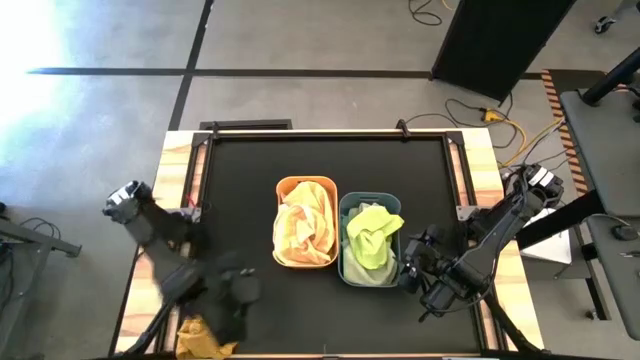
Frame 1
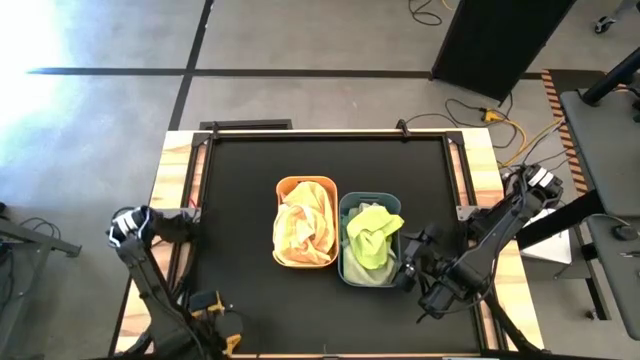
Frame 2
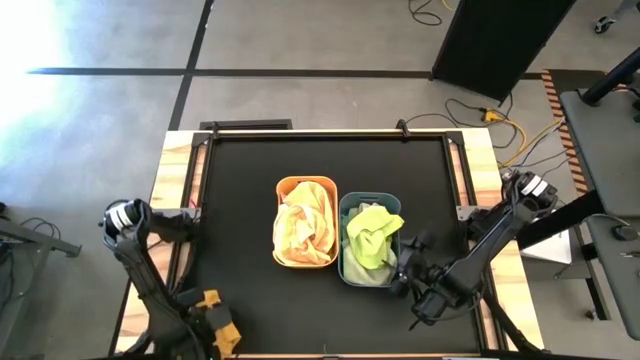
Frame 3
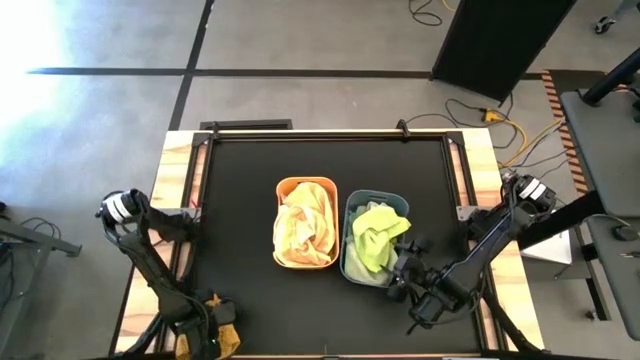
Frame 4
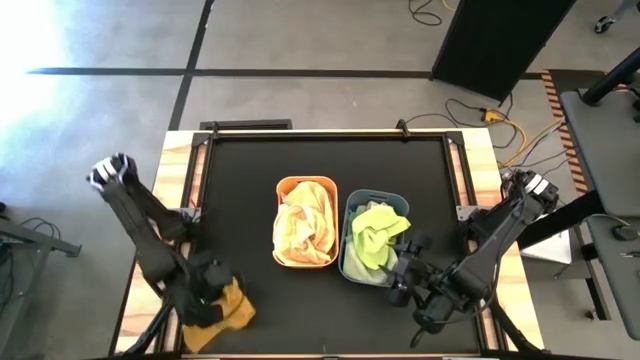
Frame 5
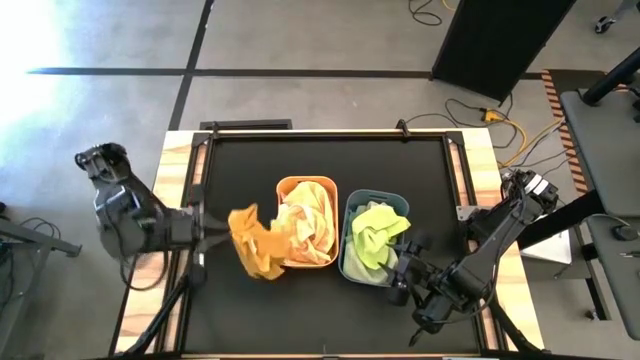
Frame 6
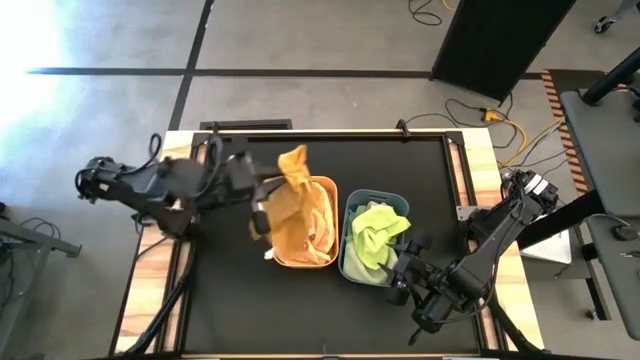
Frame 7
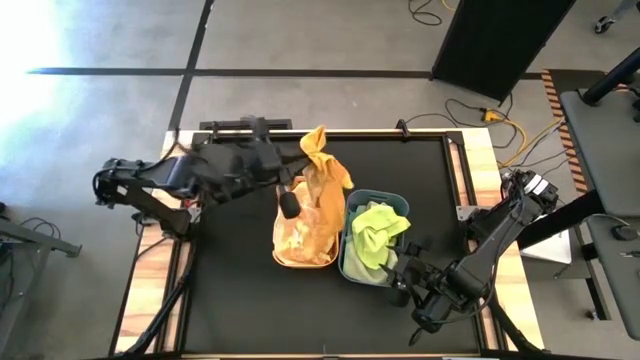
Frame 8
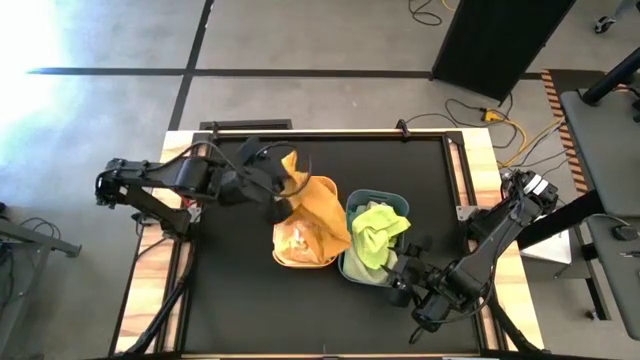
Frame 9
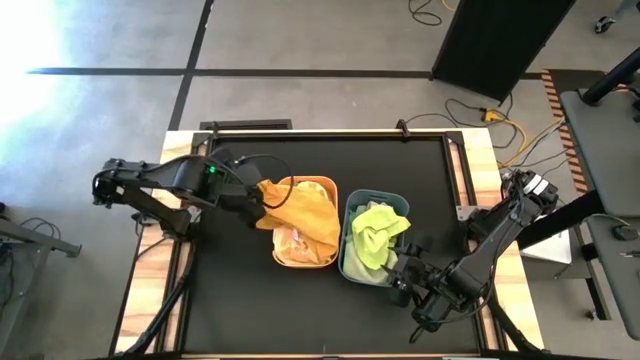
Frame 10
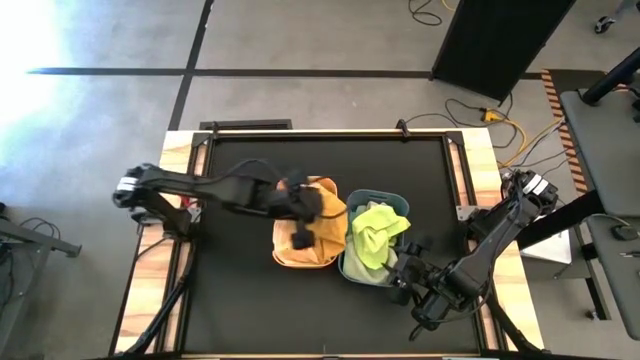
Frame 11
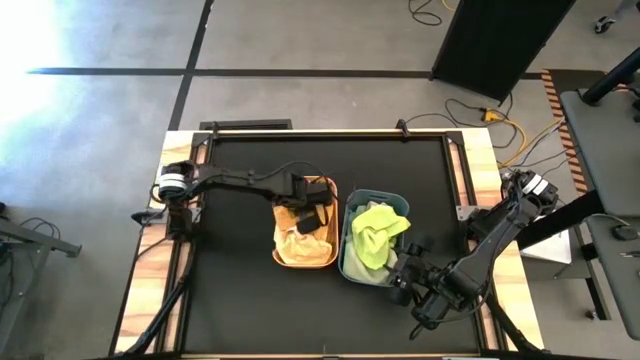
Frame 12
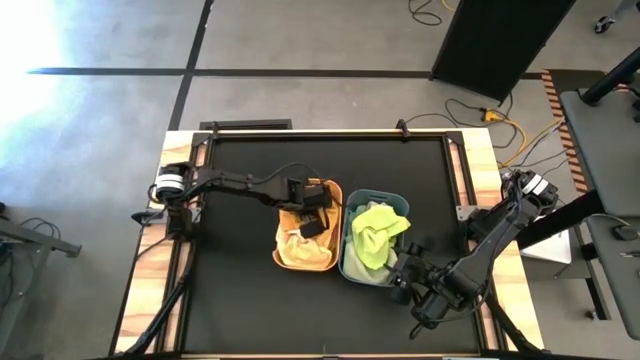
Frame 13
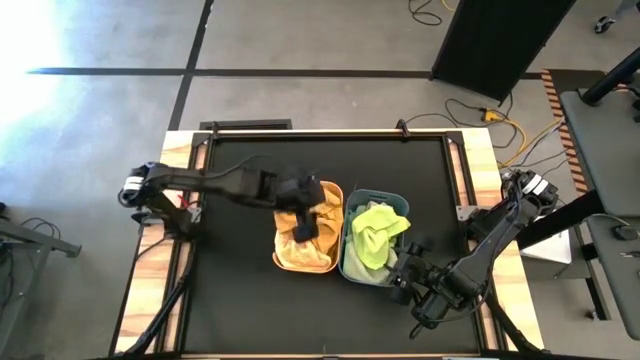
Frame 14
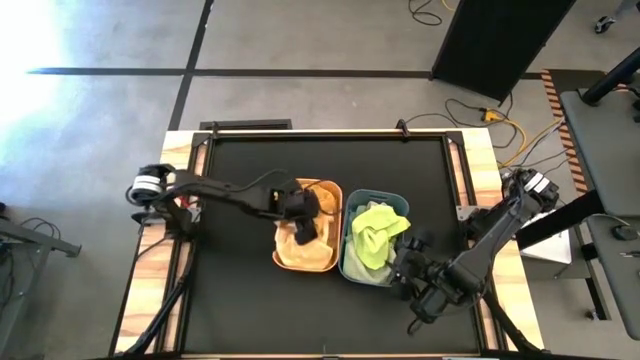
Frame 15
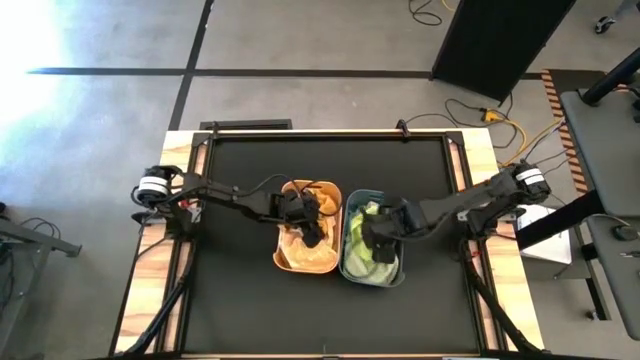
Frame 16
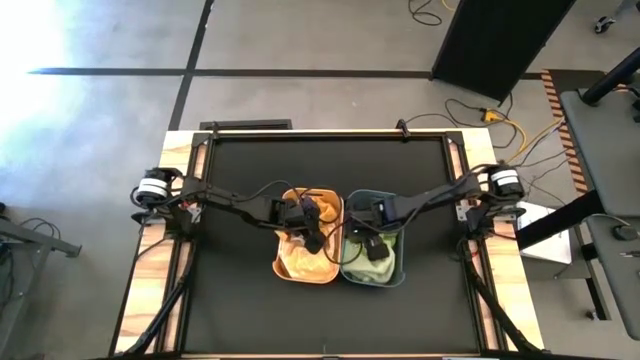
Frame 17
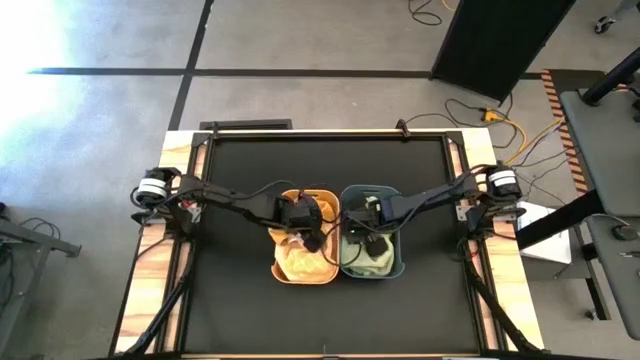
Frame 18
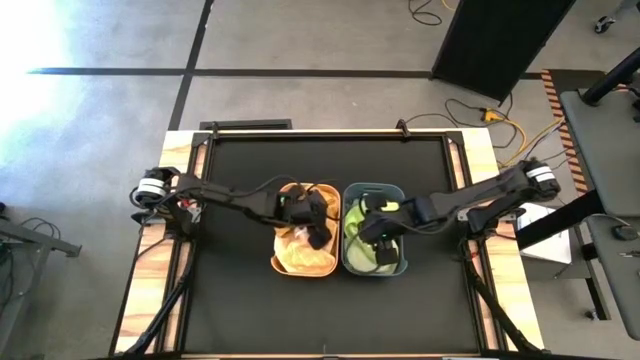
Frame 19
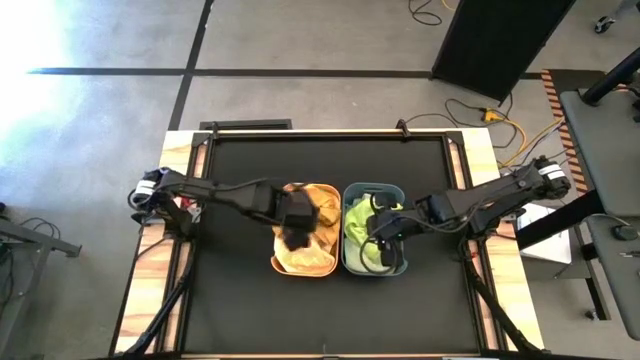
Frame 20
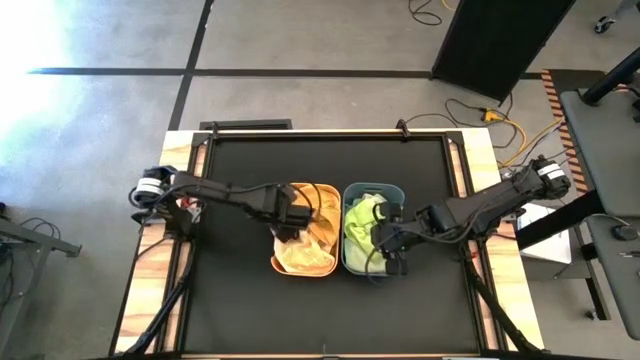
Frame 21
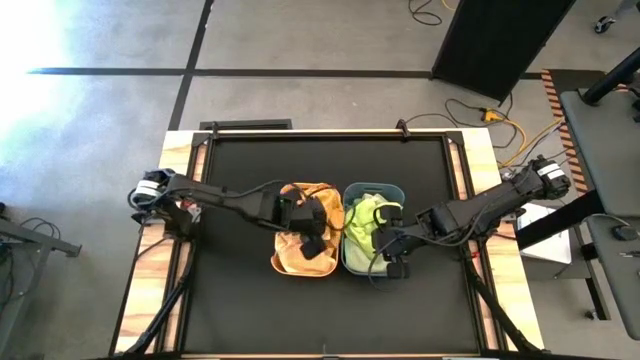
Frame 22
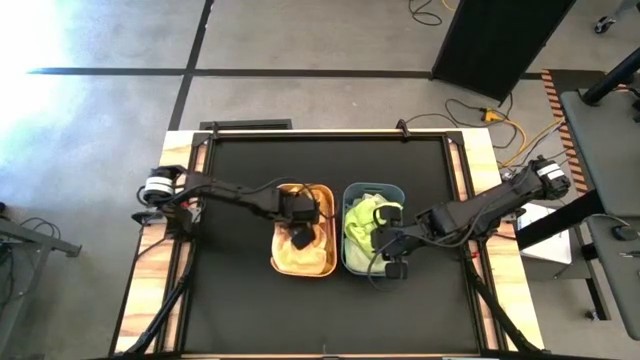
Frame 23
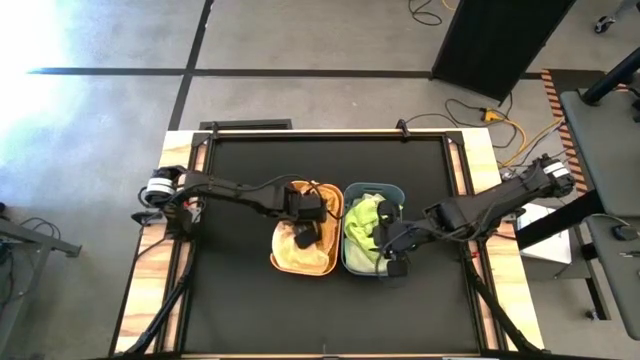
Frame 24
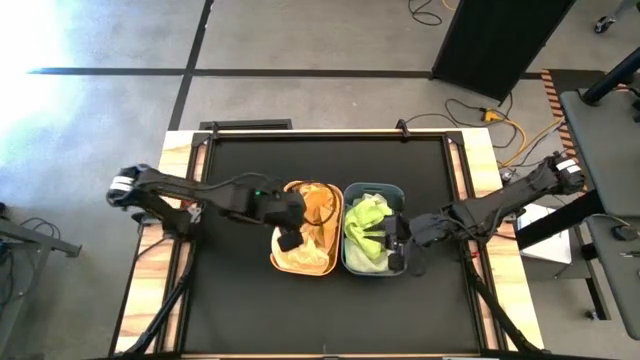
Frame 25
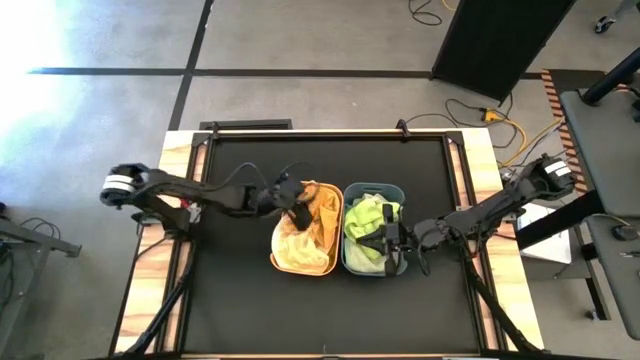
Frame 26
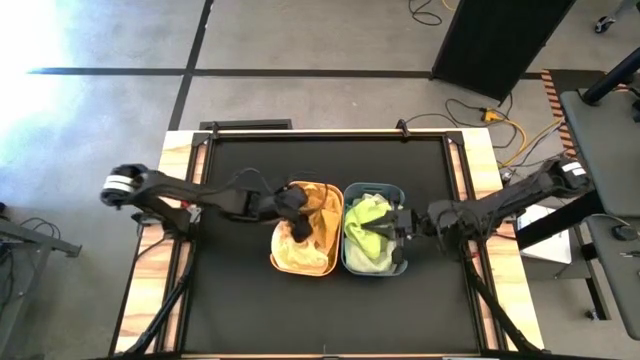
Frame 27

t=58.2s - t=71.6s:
Task: Sort towels by color in basket
Put the yellow towel into the orange bin

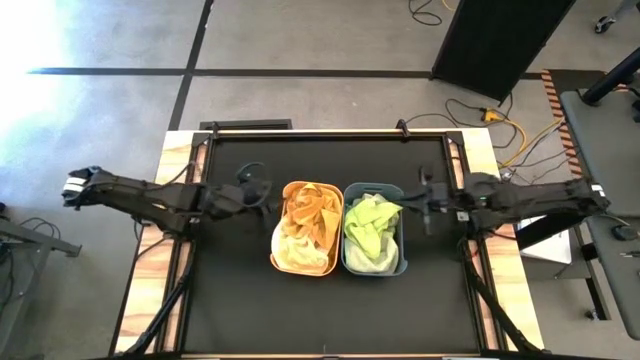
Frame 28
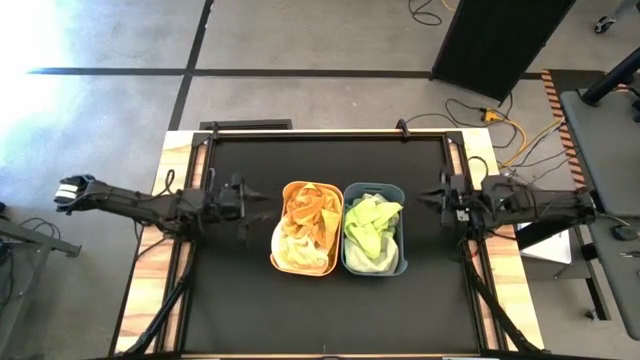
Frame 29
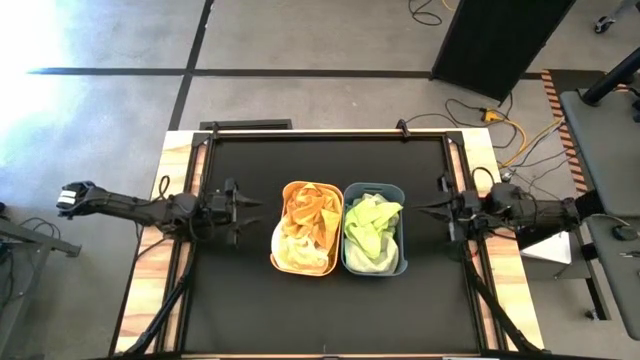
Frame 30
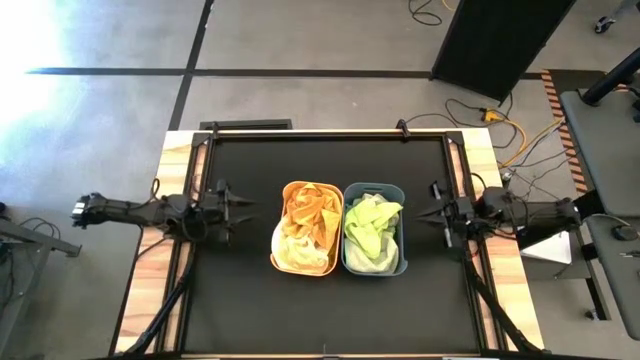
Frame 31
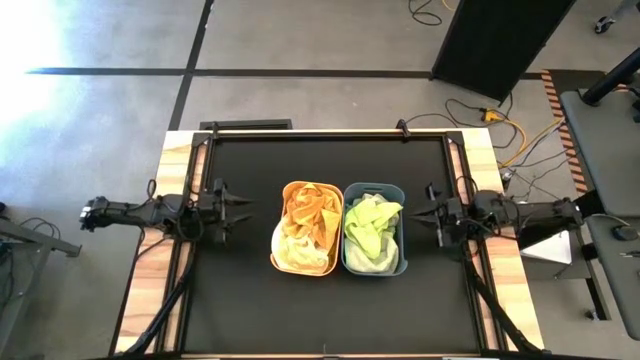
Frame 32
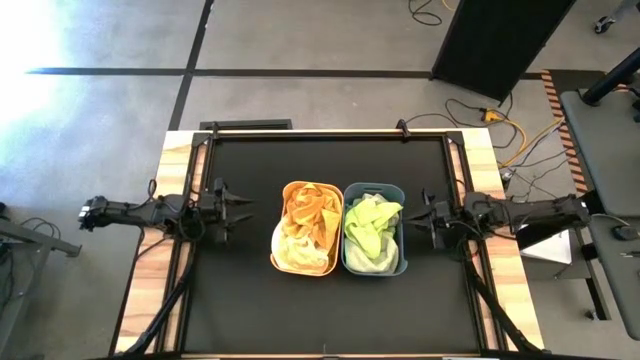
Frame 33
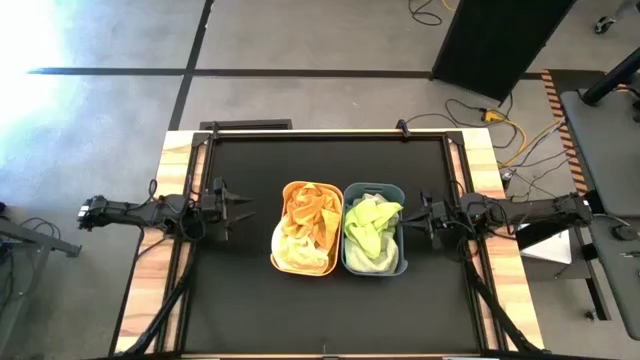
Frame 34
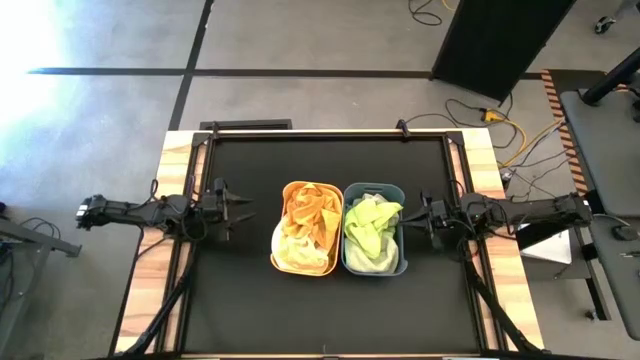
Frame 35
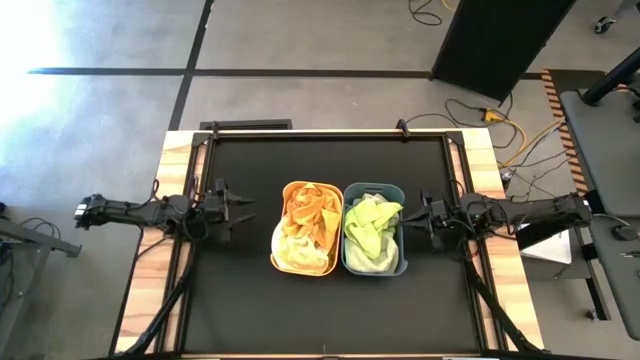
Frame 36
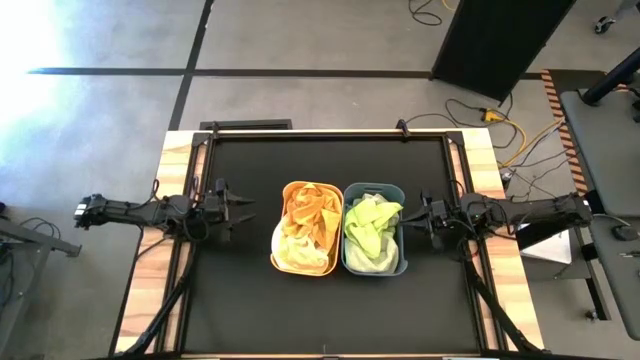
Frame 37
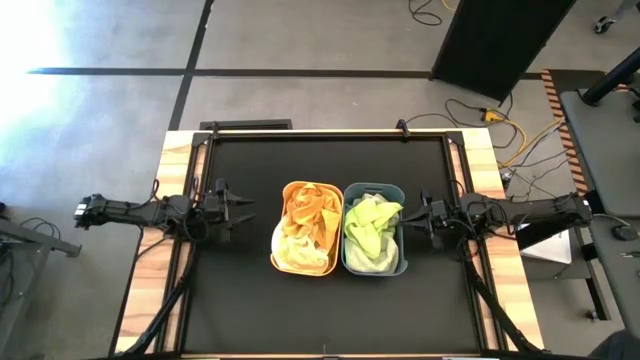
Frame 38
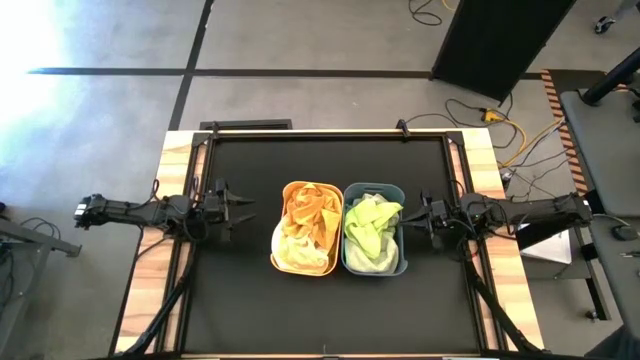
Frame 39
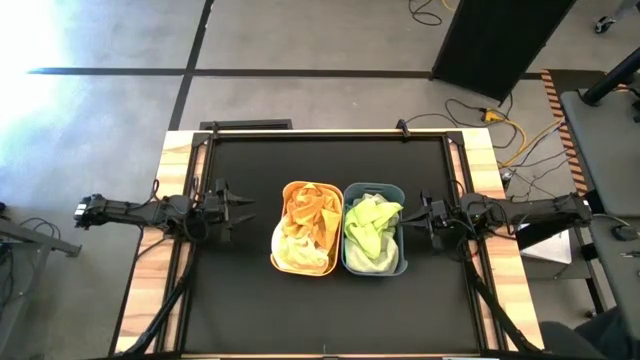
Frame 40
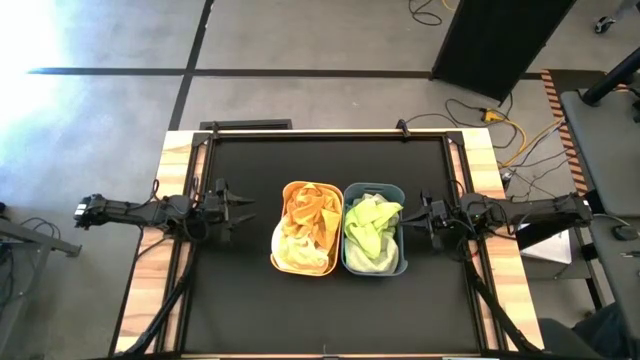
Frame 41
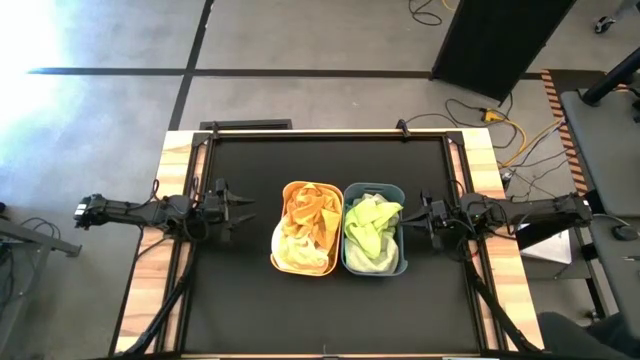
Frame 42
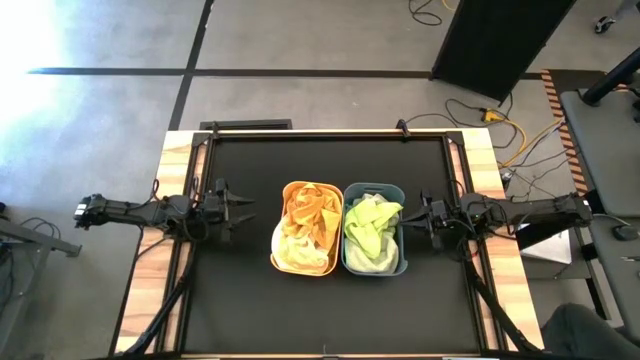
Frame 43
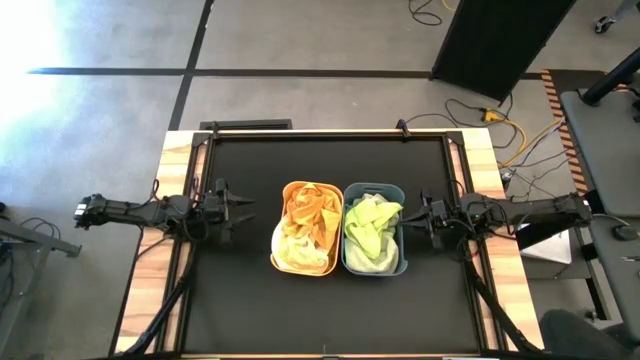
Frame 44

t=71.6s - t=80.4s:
Return to Home Position
